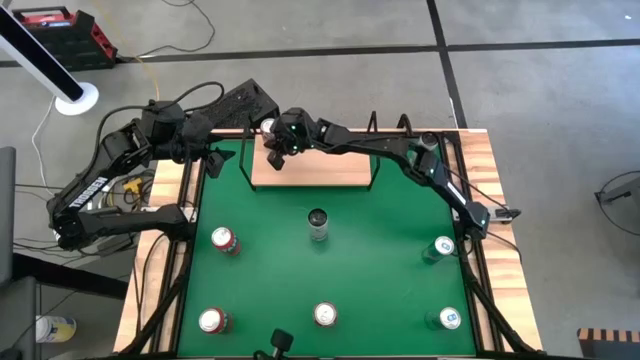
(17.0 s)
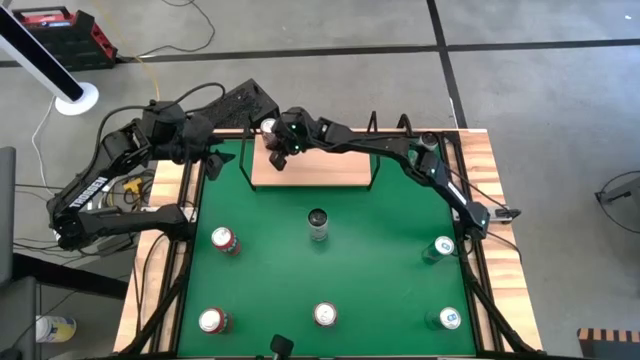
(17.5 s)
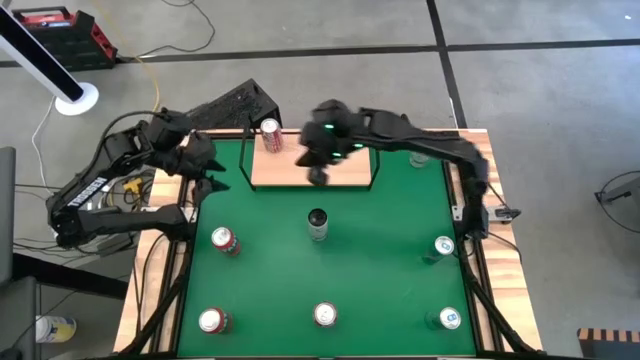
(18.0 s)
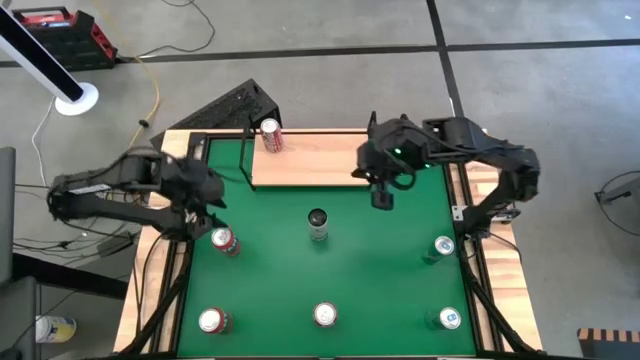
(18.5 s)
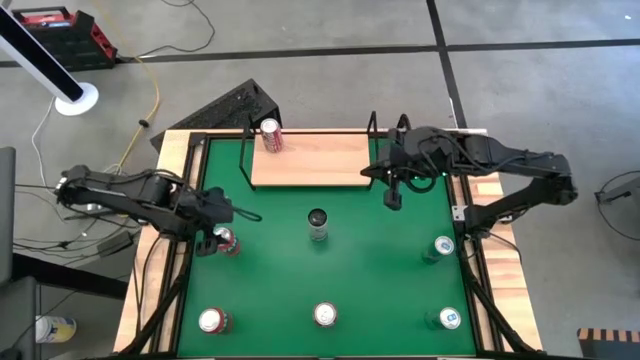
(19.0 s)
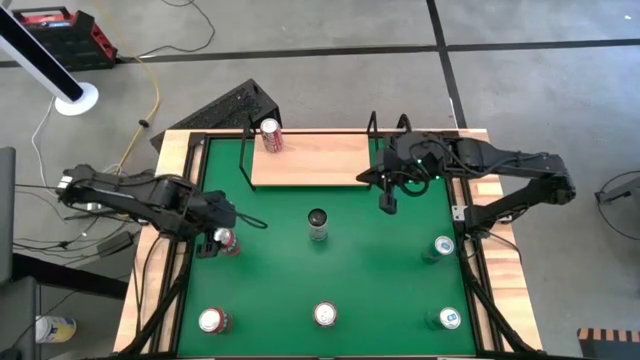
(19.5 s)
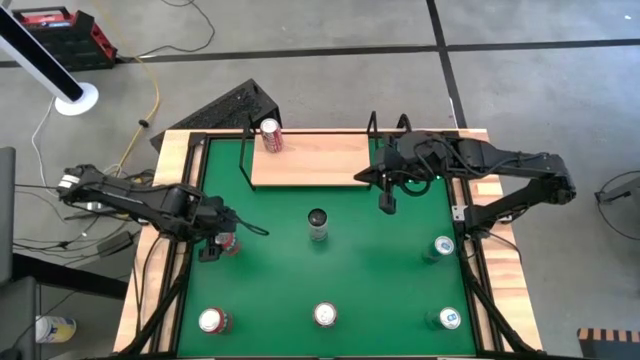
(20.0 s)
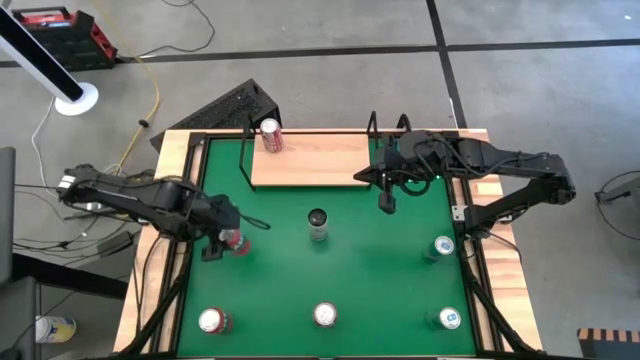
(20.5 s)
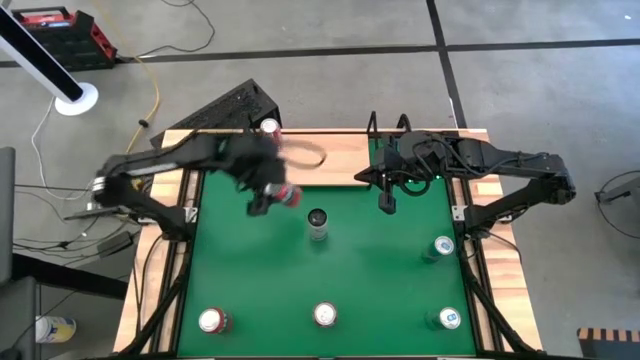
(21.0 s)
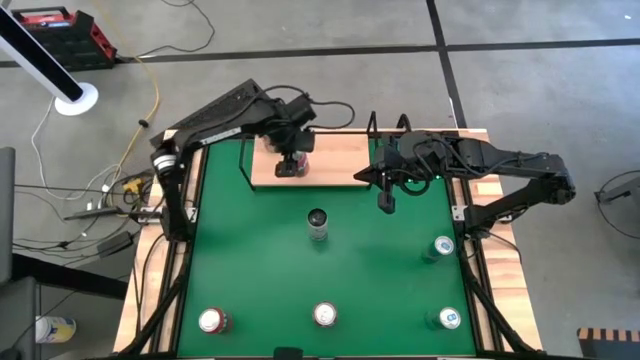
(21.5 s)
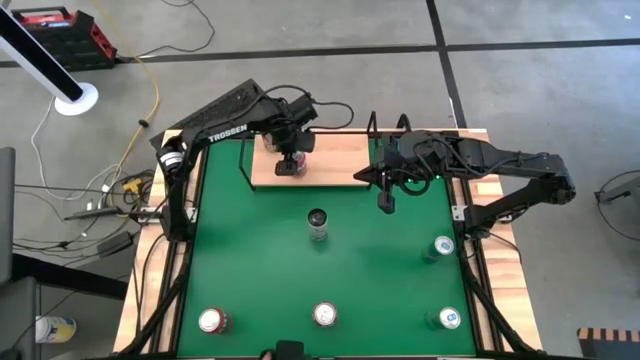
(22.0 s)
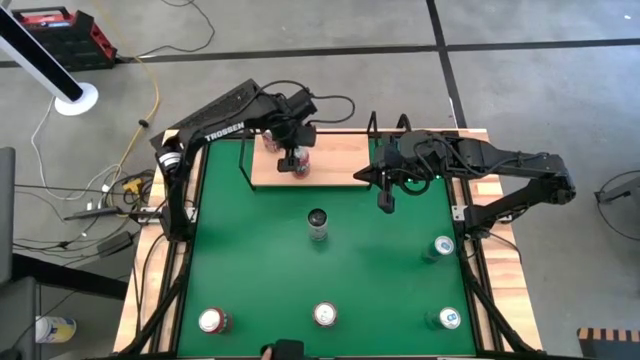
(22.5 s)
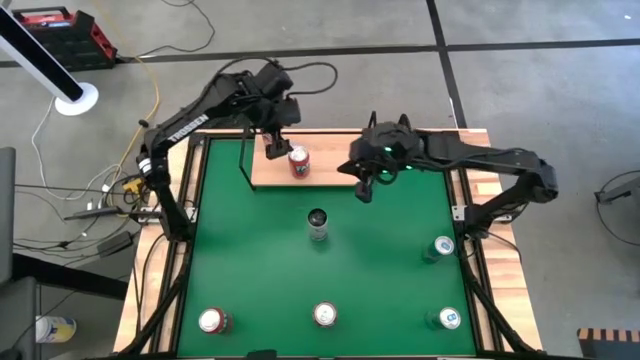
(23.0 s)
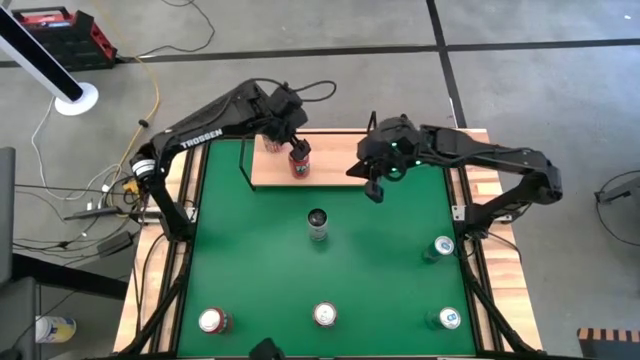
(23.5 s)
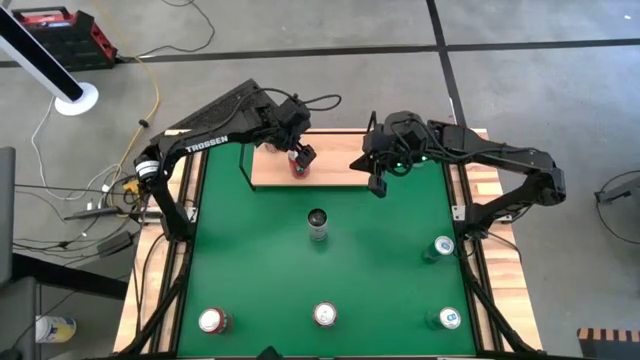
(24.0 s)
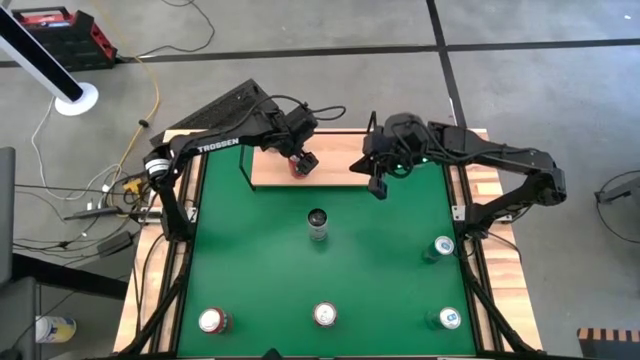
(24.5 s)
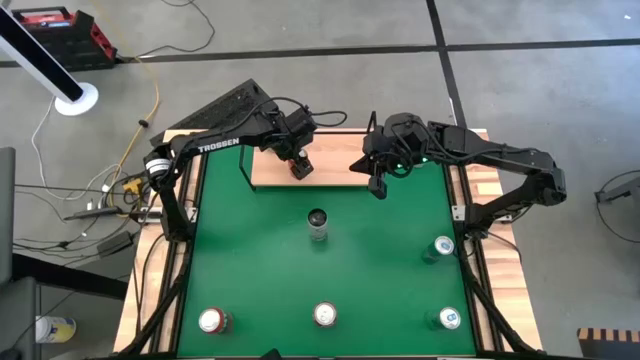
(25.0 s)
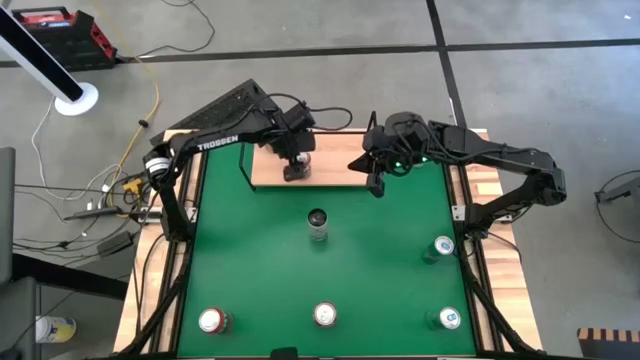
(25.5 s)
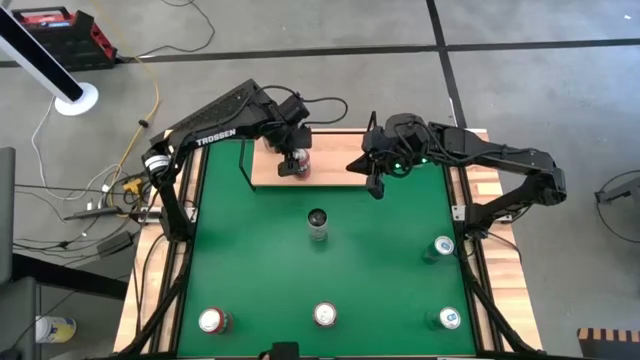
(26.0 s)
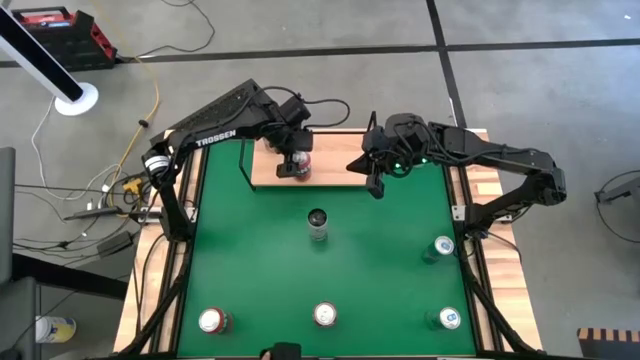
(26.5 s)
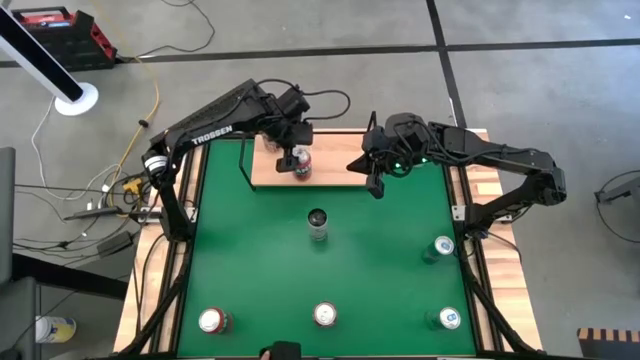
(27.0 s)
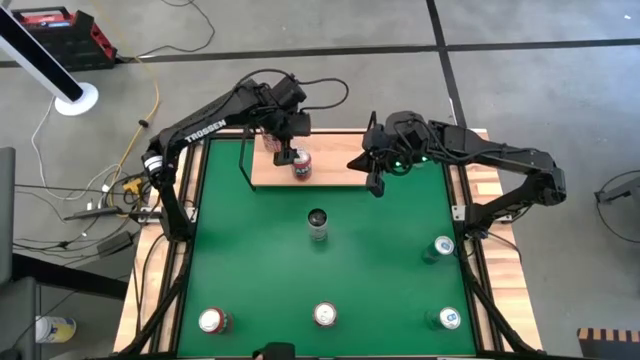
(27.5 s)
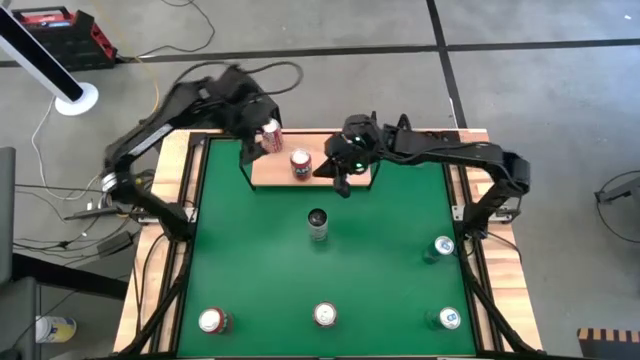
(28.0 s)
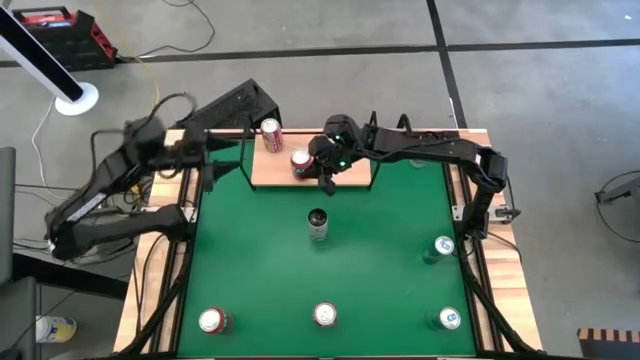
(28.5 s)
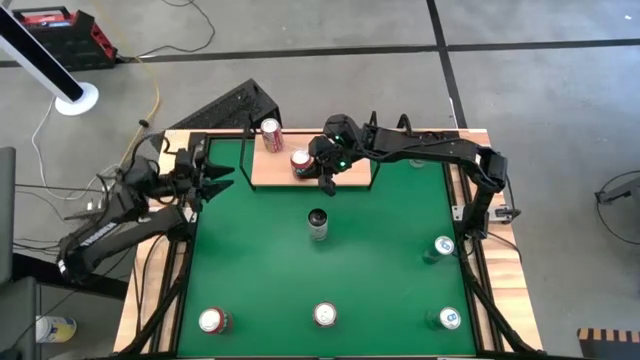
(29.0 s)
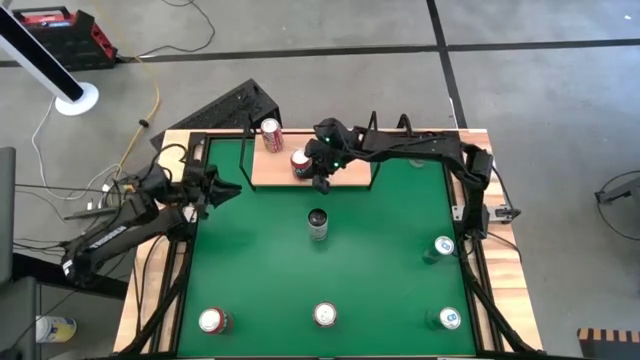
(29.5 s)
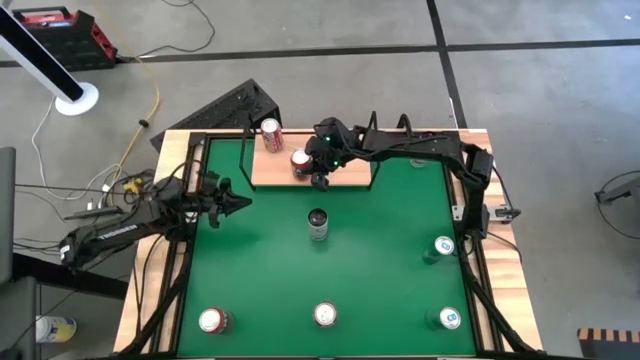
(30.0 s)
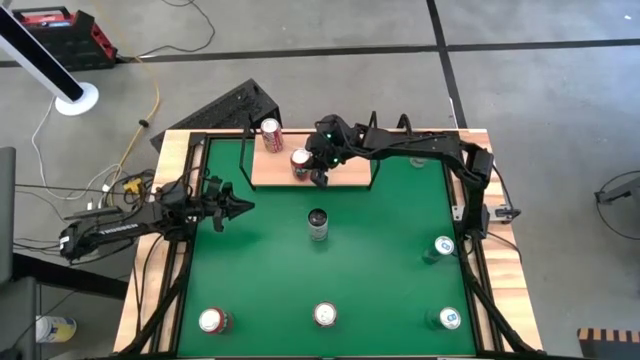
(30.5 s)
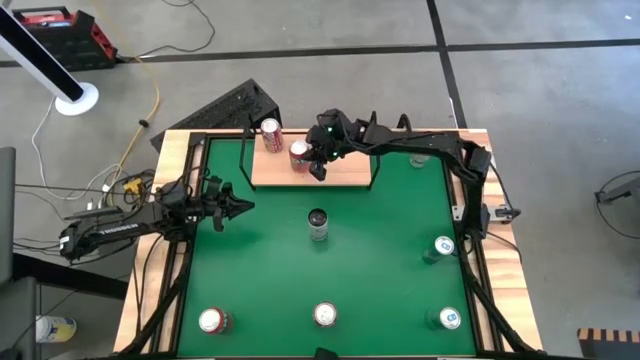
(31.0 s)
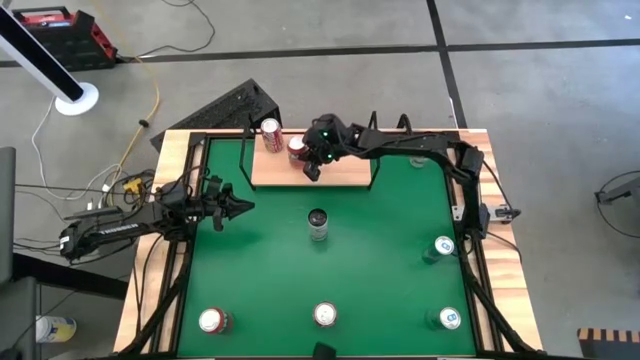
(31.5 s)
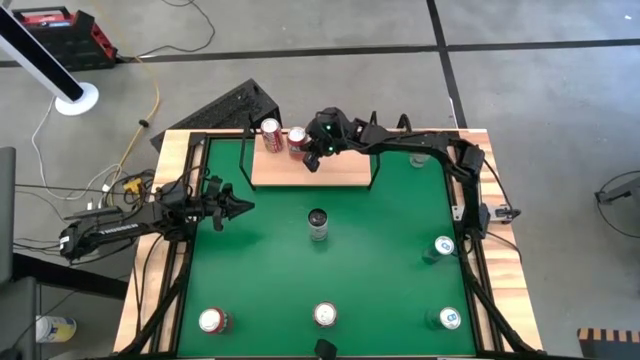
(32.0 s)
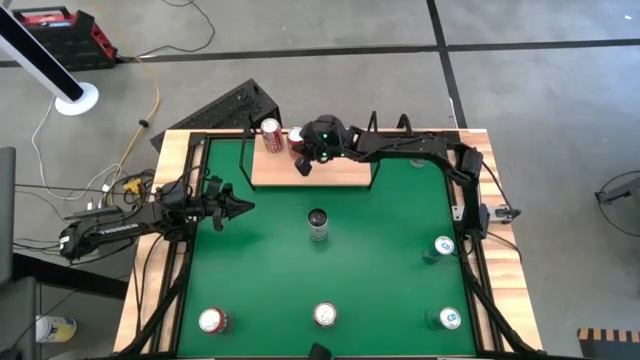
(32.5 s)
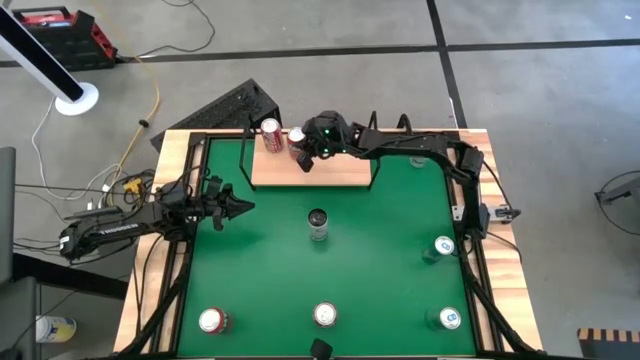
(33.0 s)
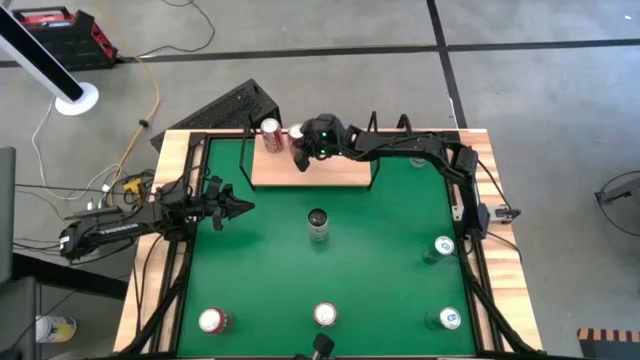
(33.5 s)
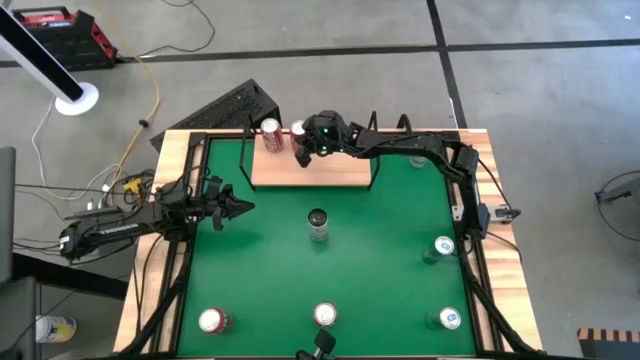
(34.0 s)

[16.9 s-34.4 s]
Task: Place canned beverage on shelf
Put the top red soda can on the shelf

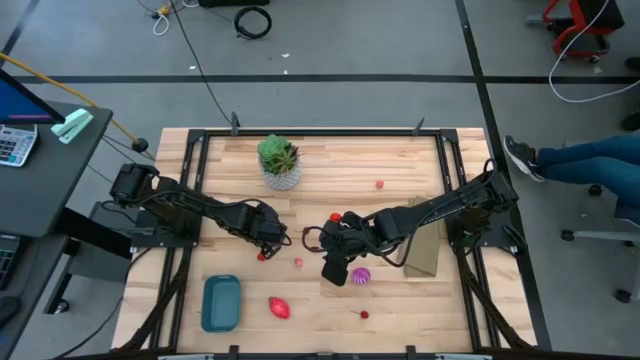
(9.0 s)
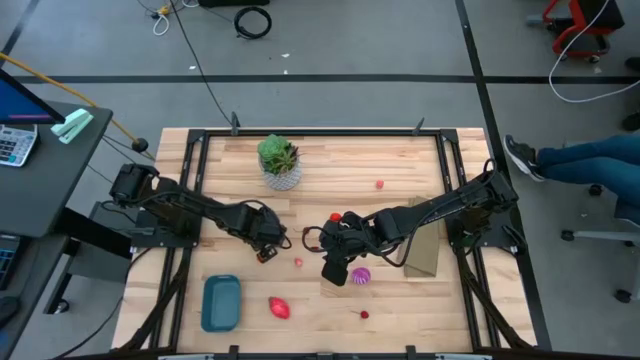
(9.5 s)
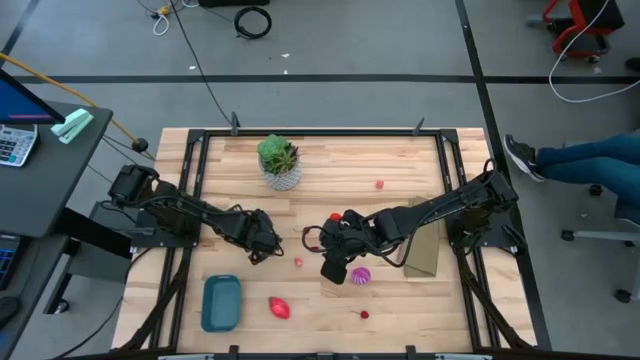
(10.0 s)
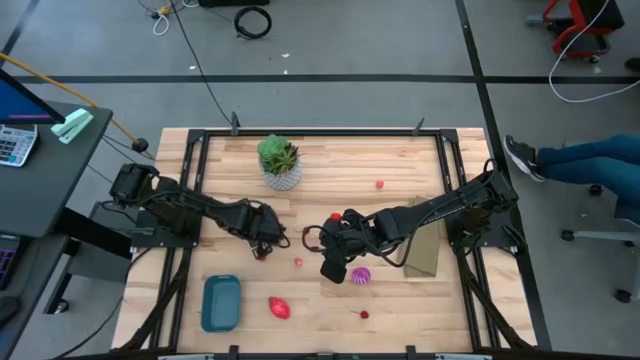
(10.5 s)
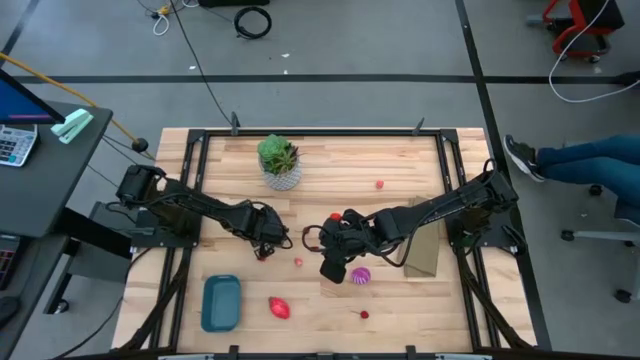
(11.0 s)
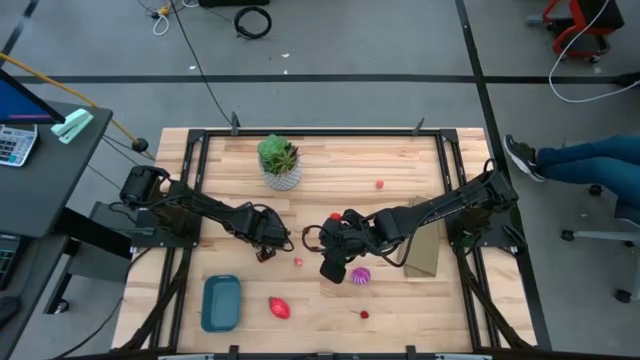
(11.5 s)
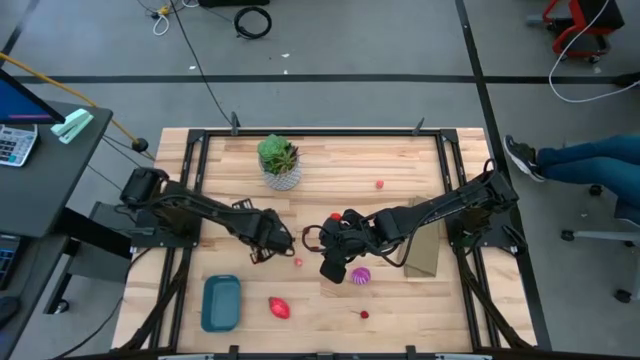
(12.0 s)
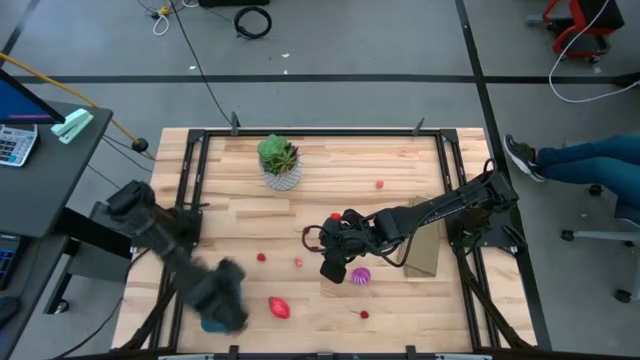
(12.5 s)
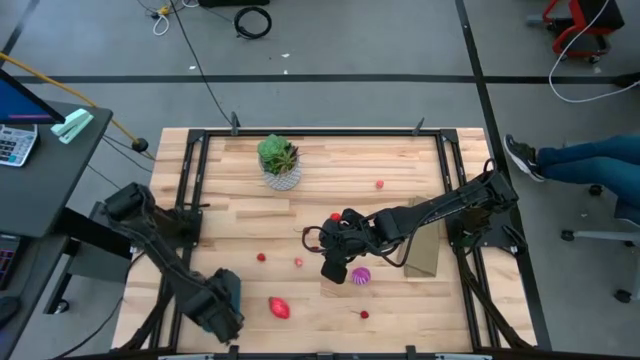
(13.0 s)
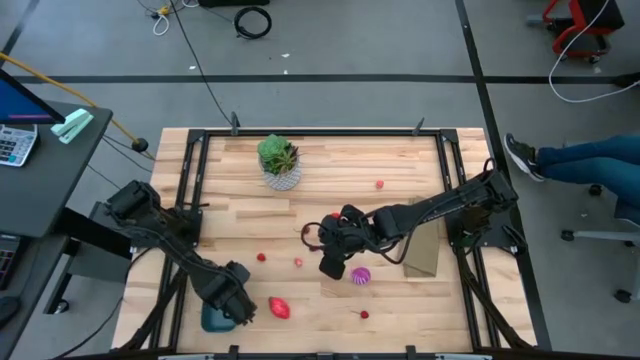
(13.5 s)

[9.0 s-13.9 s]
Task: Pick and placing Produce into tupperware
Put the red cherry into the bin
